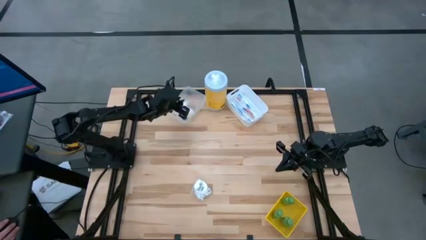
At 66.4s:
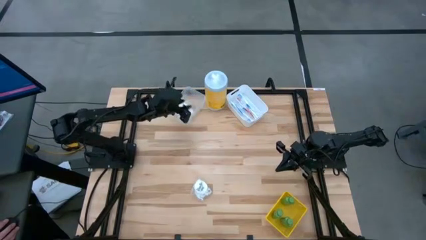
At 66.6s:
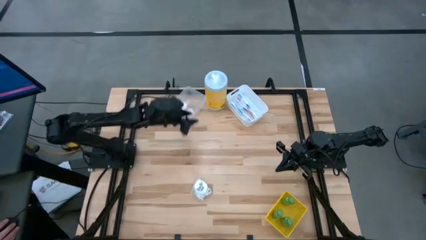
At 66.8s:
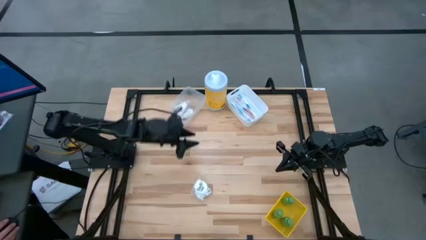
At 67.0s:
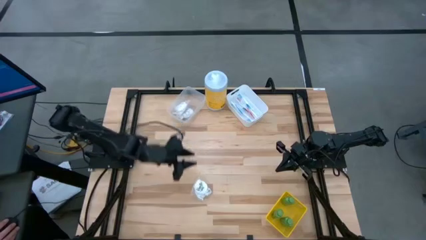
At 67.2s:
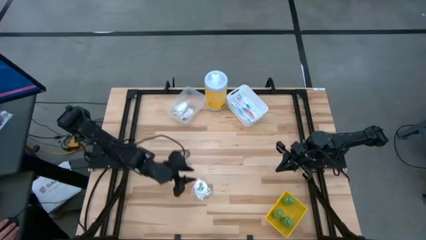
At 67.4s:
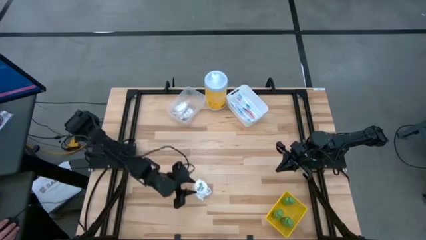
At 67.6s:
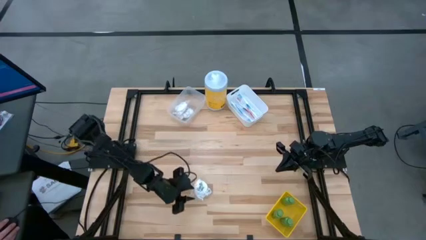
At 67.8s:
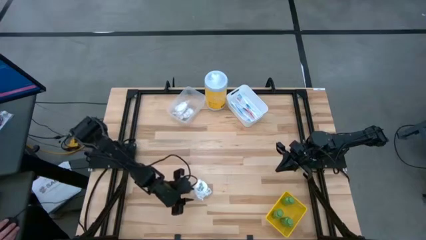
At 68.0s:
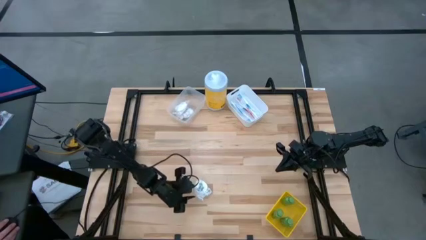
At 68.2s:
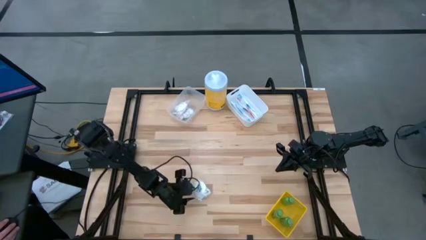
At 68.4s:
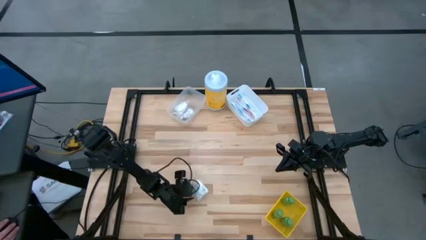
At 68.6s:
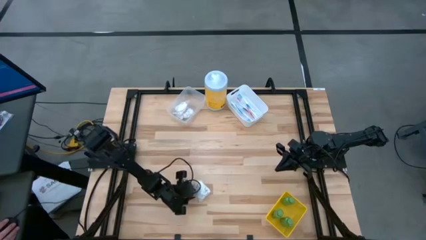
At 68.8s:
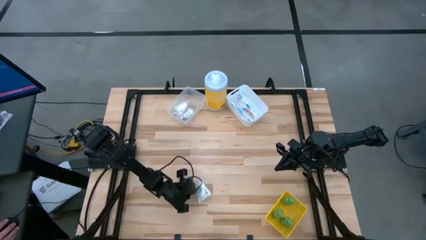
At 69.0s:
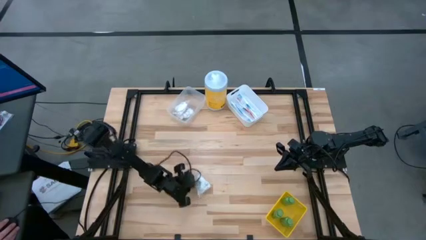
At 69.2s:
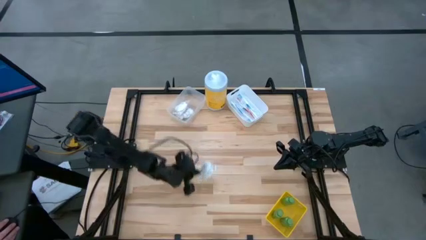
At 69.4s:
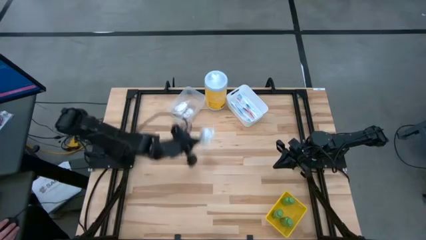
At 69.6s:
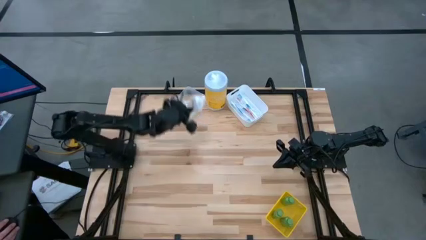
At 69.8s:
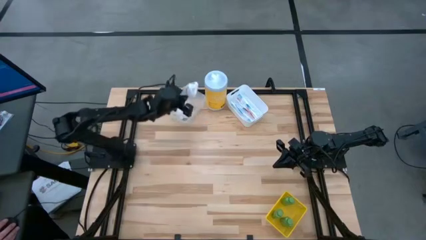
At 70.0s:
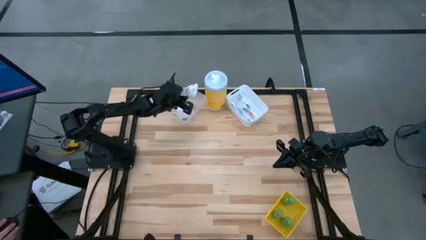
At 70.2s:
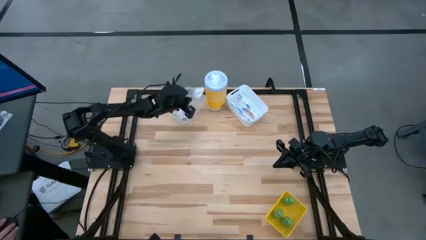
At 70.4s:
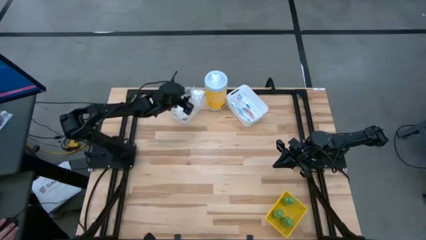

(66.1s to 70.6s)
Task: Pick & Place Travel size toiletries
Put the cotton pack into the transparent bin

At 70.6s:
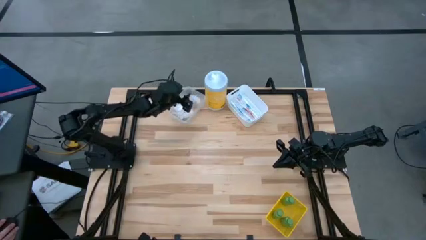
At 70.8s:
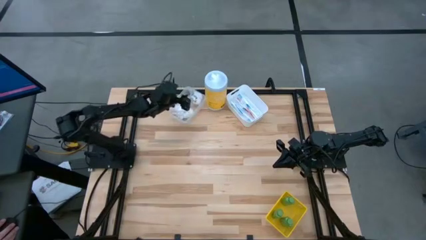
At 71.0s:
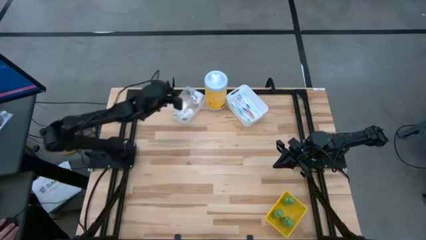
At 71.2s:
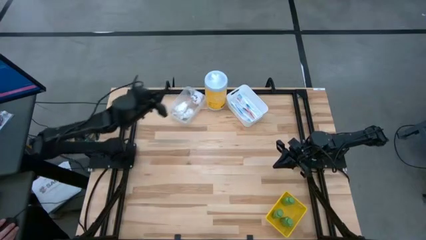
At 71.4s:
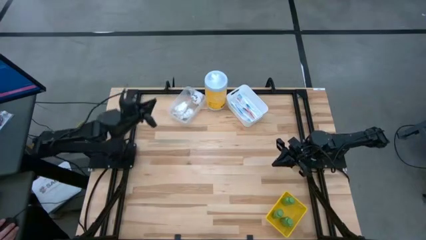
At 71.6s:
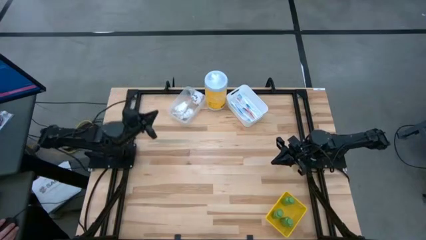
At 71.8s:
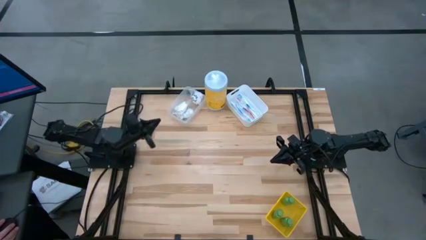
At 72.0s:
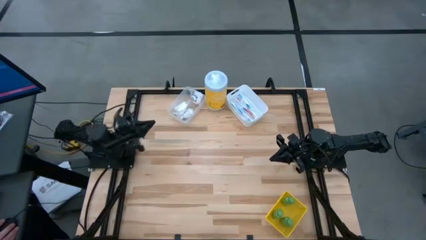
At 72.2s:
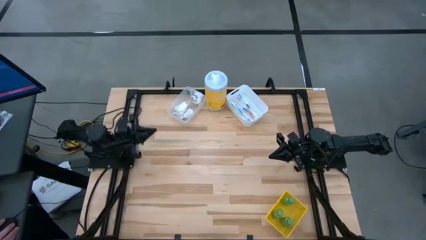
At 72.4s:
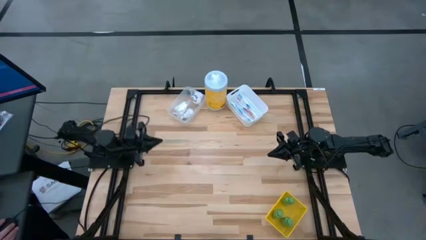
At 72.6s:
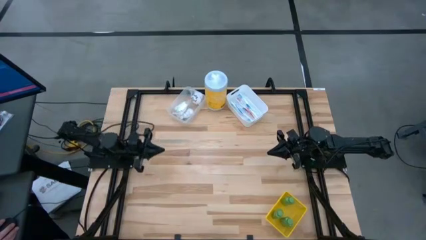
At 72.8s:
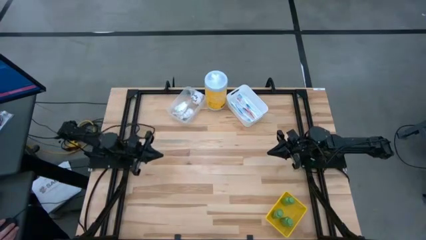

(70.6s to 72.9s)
Return to Home Position

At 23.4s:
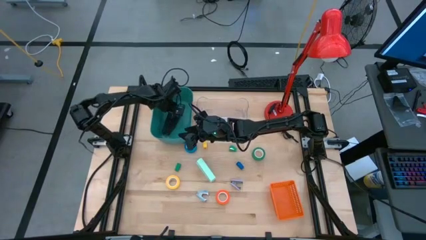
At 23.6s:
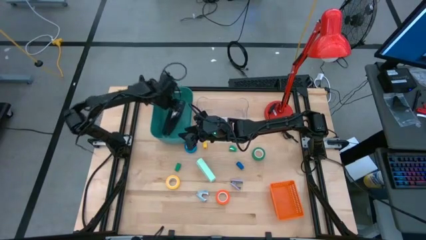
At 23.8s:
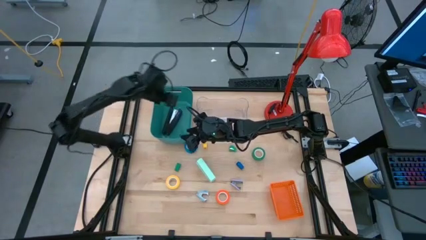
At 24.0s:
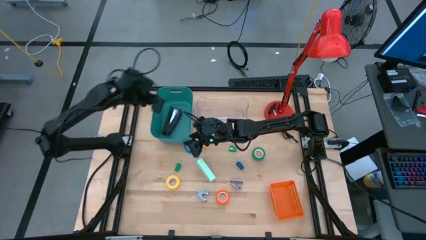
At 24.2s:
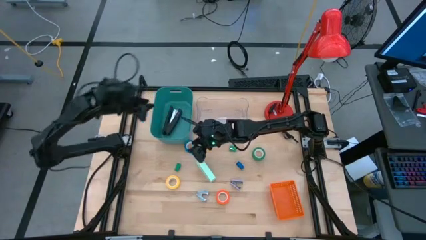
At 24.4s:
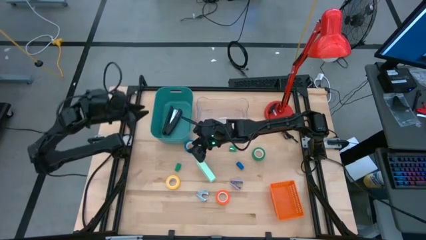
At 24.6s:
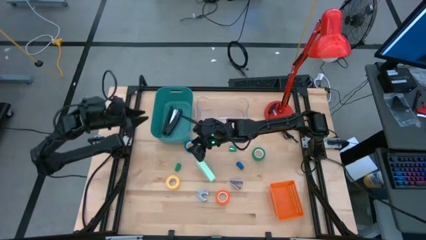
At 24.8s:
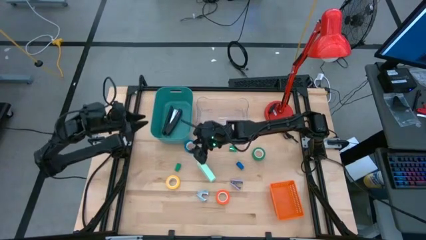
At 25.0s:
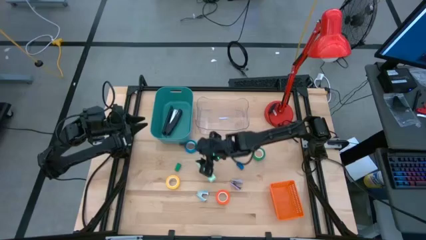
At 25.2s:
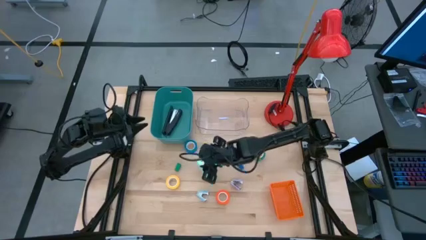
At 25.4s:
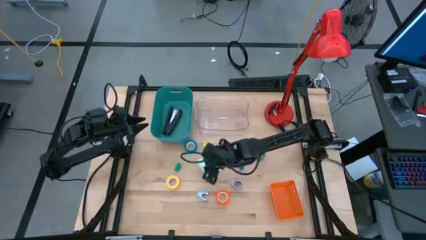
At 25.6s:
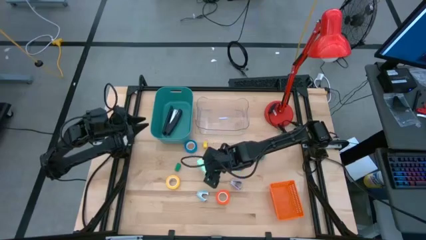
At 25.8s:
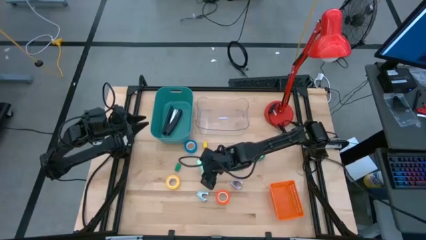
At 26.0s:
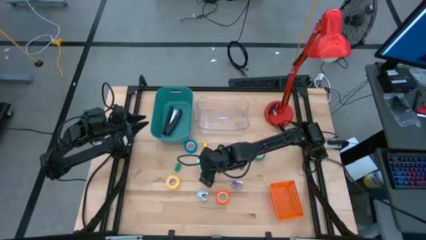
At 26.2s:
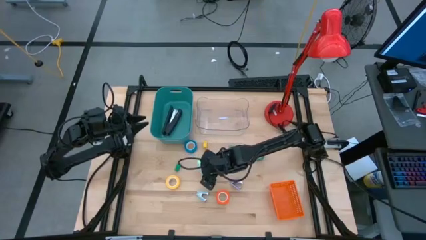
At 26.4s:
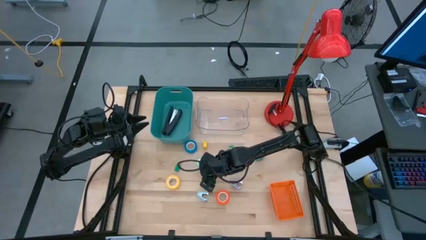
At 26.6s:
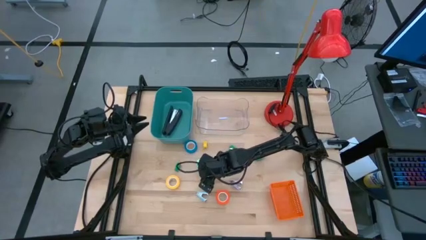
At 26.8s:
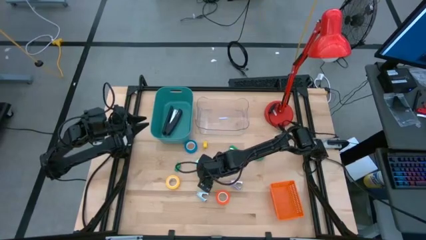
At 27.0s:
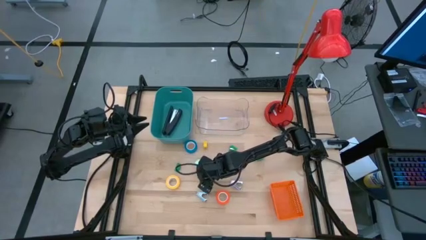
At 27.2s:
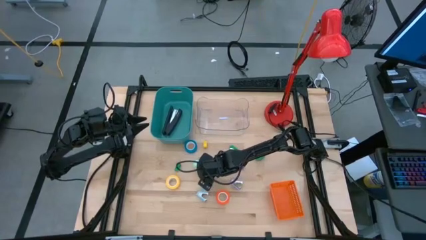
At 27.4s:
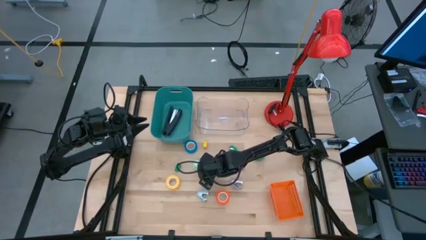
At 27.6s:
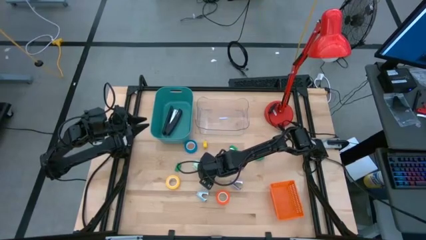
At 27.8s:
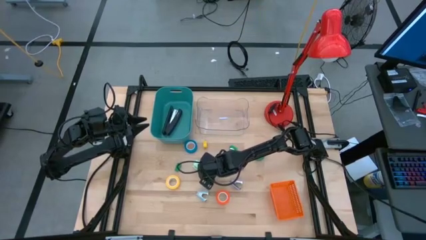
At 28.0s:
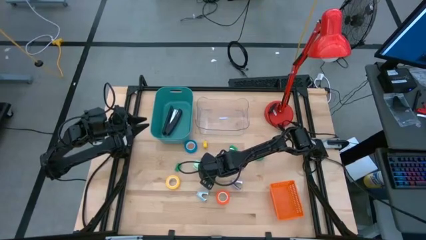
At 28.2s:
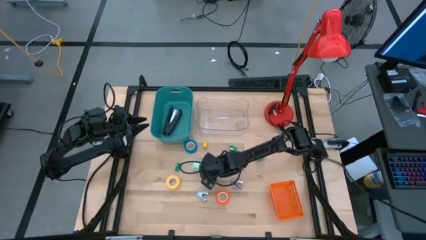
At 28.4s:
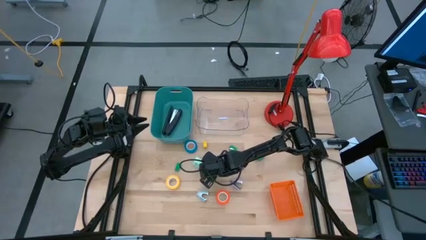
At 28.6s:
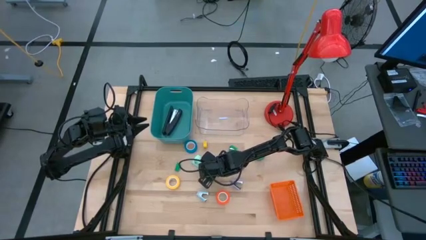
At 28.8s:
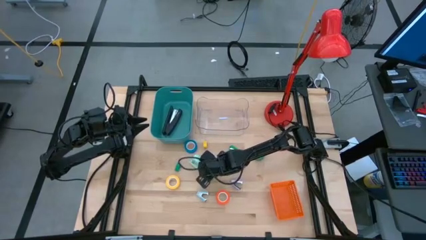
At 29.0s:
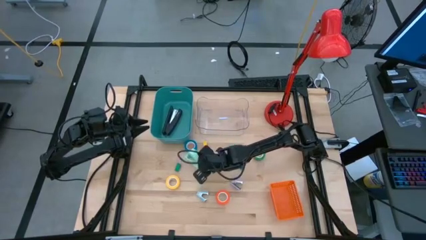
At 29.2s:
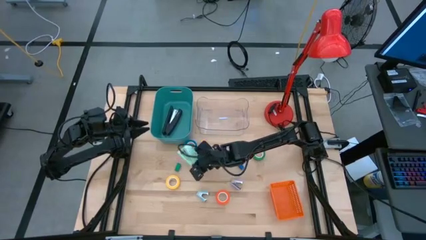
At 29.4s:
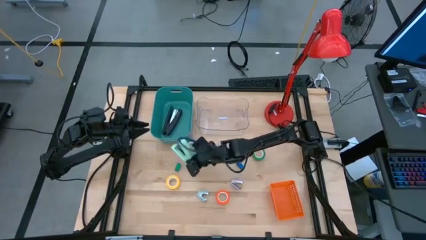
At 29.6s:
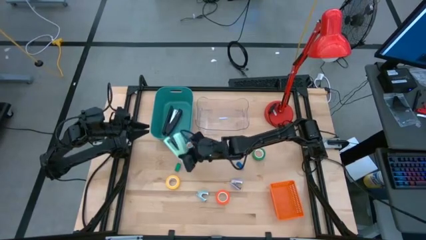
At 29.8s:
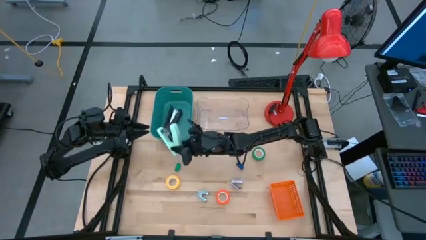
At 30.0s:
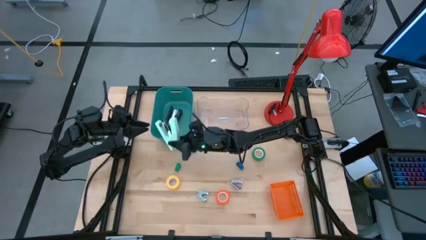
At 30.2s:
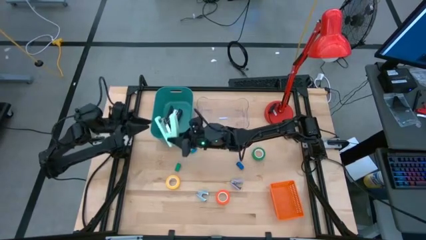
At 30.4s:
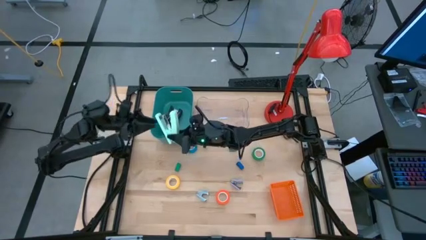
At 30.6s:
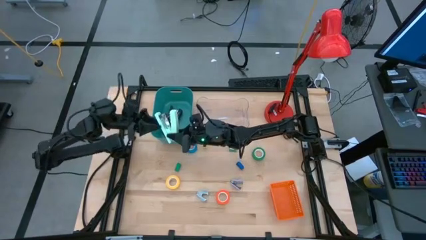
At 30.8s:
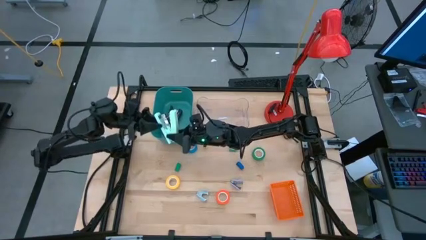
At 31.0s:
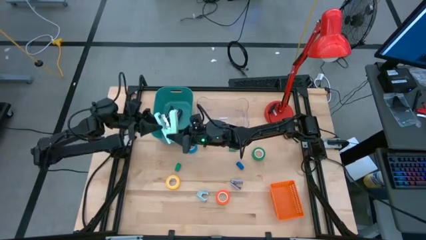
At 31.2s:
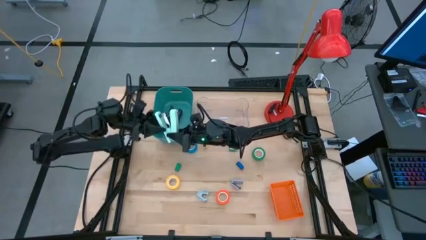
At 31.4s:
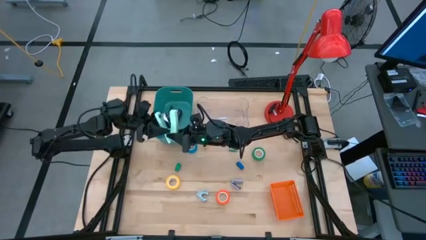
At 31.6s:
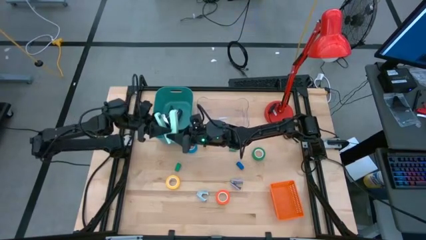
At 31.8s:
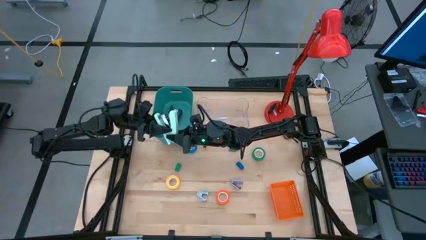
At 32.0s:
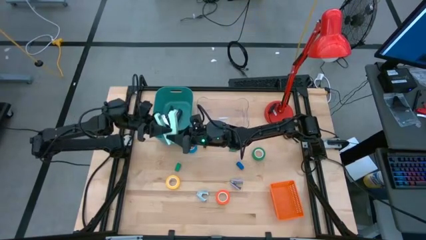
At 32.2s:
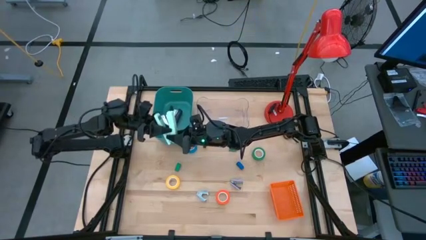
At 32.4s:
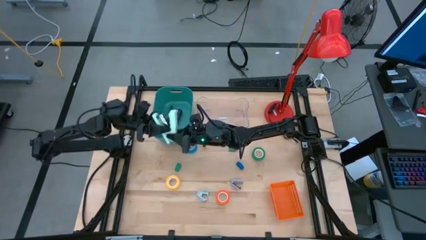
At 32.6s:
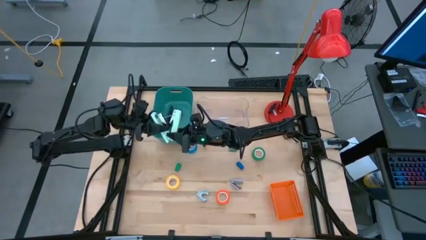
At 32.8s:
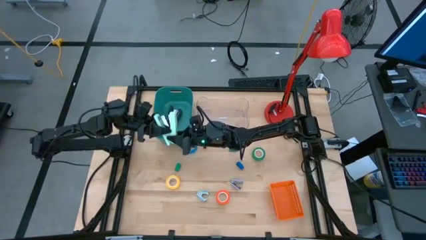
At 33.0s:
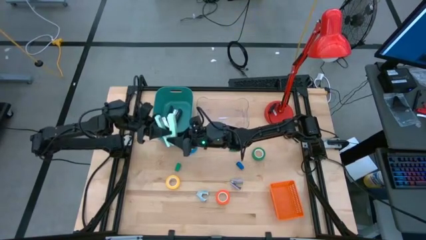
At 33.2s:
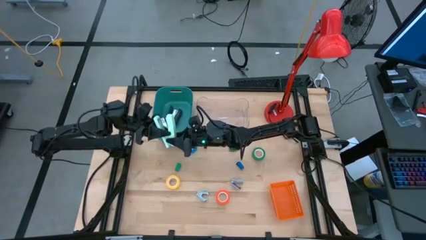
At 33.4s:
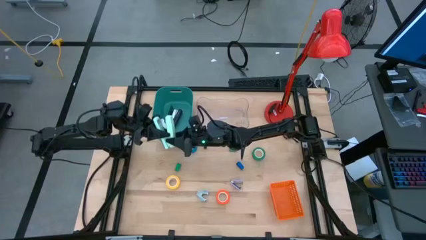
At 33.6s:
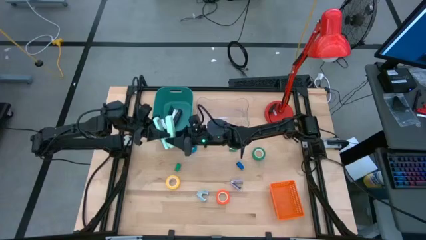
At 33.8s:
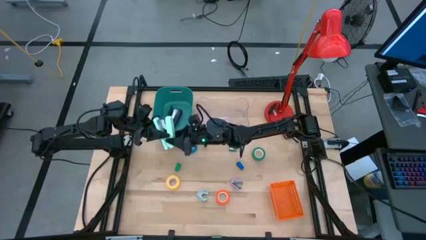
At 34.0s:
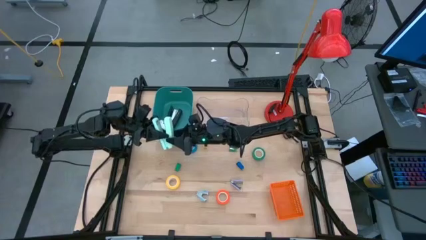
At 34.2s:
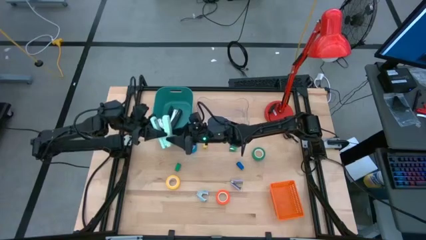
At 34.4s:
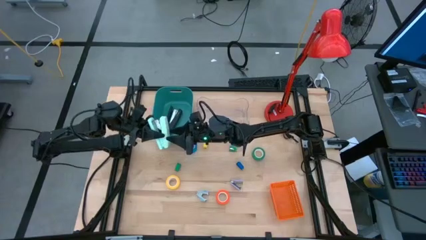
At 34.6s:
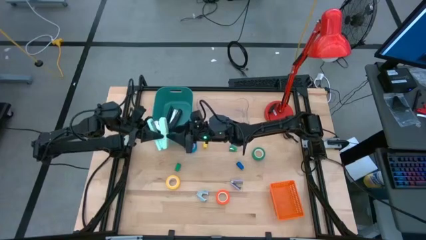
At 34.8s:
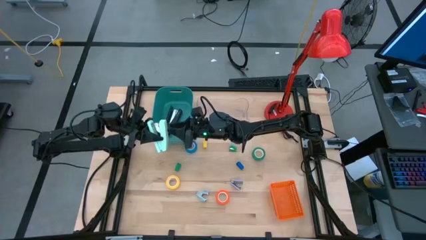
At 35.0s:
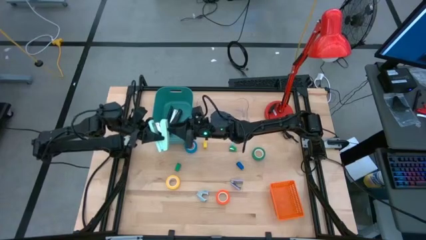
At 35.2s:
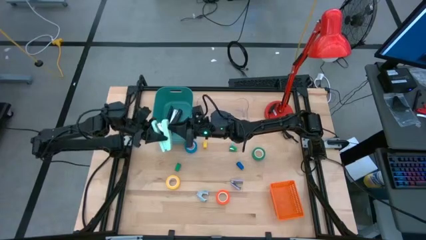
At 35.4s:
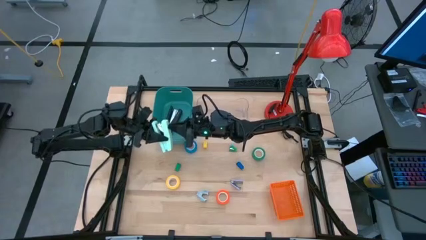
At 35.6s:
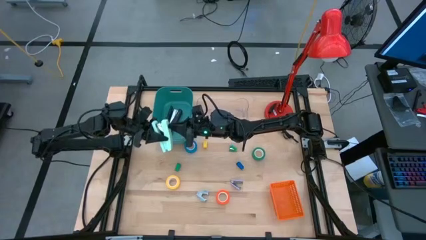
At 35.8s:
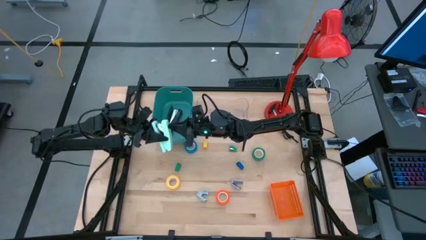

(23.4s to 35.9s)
Task: Pick and place Stapler, Stapler remover, tape
Put the light green stapler into the green bin
